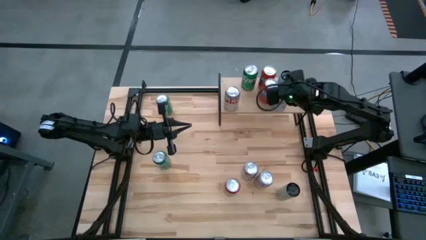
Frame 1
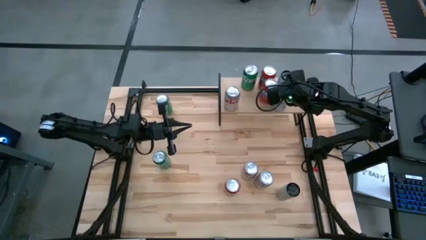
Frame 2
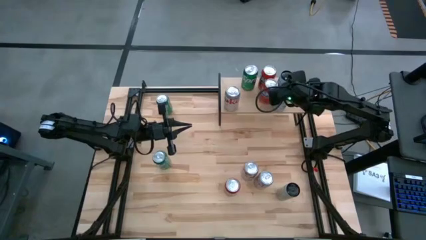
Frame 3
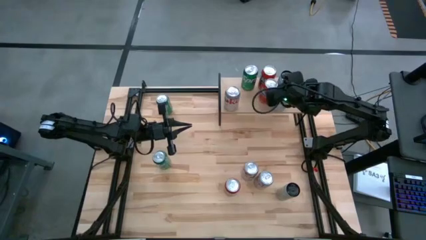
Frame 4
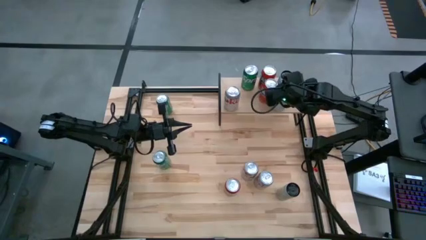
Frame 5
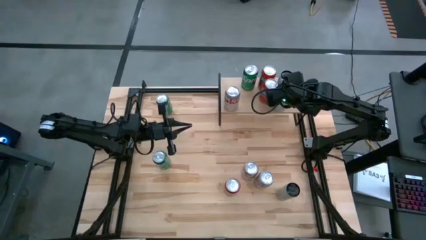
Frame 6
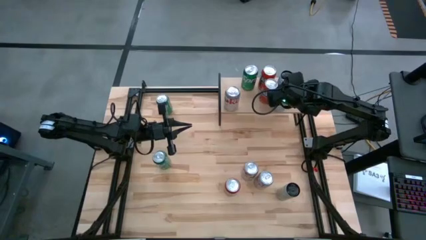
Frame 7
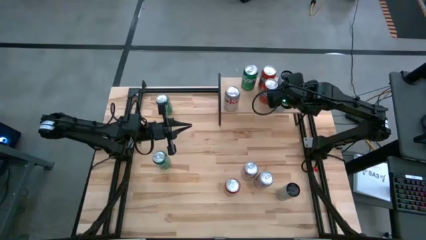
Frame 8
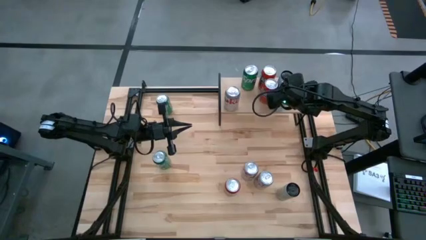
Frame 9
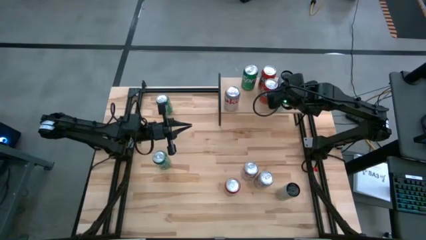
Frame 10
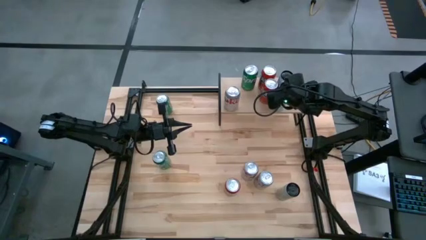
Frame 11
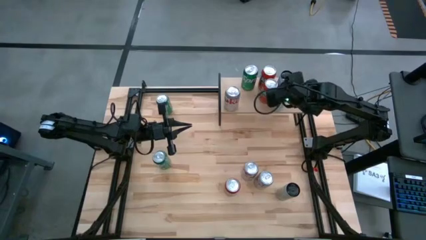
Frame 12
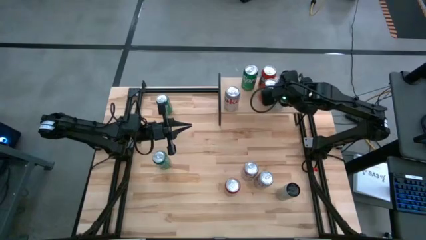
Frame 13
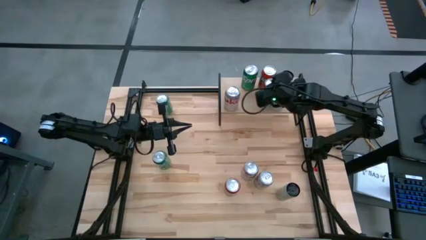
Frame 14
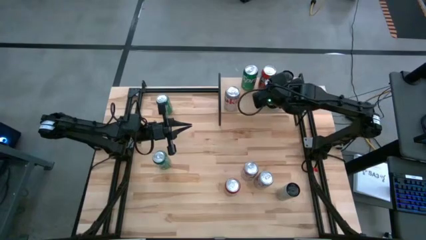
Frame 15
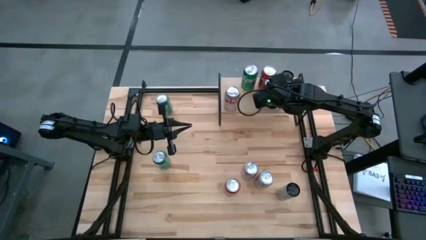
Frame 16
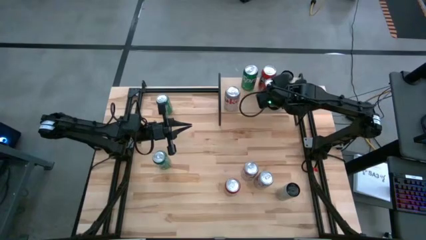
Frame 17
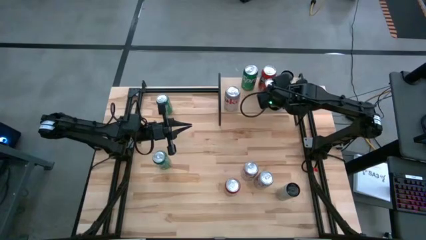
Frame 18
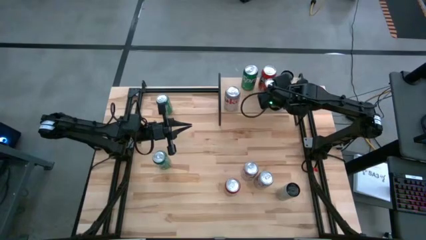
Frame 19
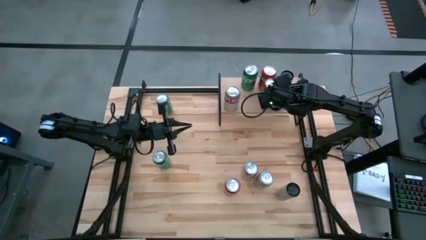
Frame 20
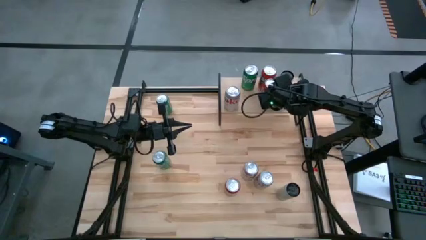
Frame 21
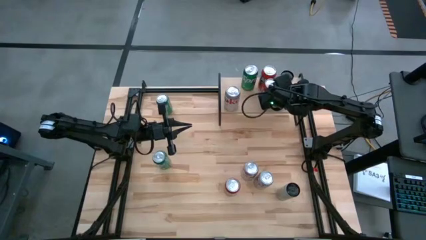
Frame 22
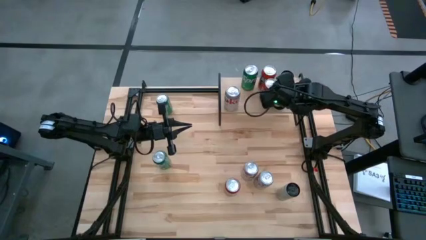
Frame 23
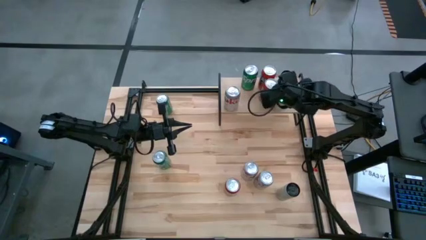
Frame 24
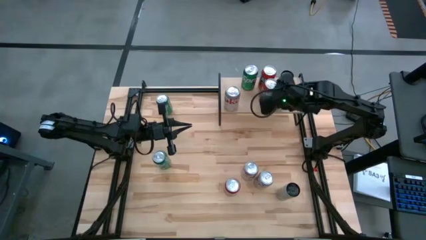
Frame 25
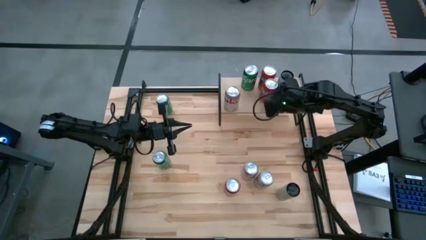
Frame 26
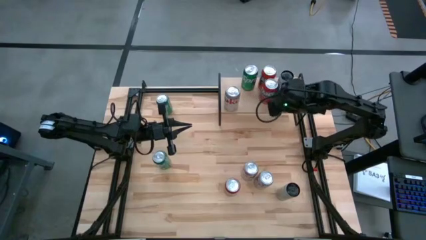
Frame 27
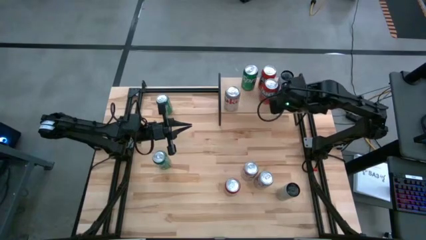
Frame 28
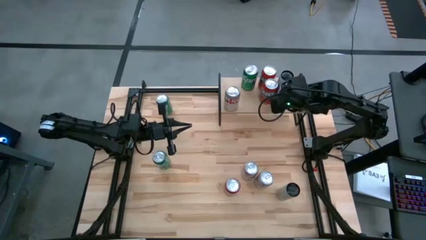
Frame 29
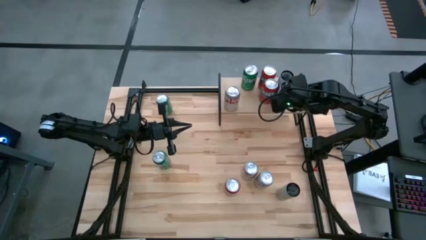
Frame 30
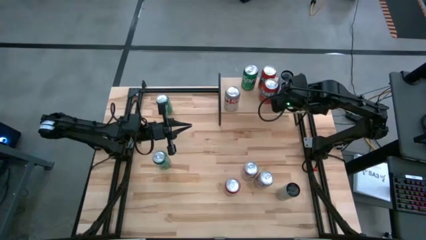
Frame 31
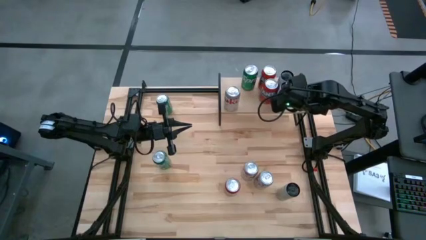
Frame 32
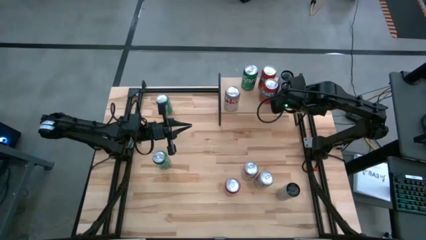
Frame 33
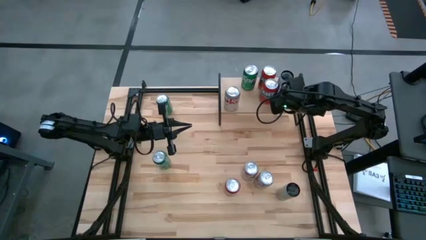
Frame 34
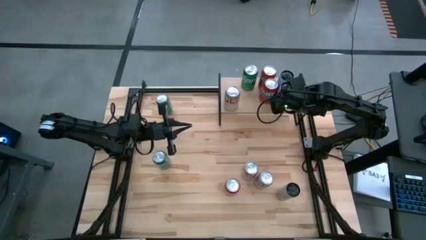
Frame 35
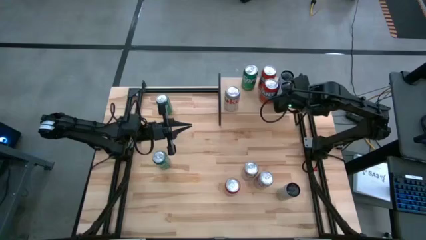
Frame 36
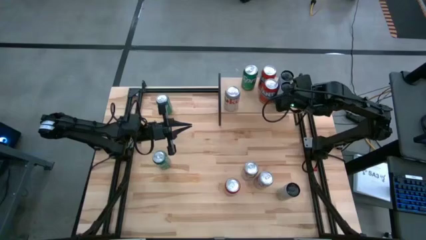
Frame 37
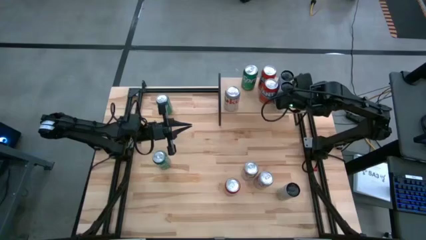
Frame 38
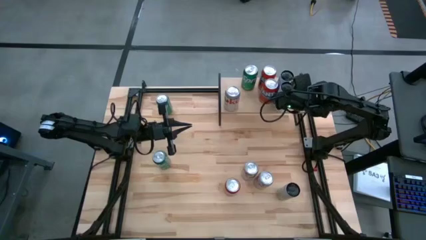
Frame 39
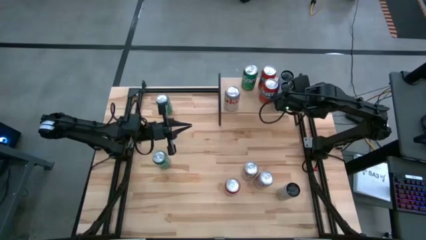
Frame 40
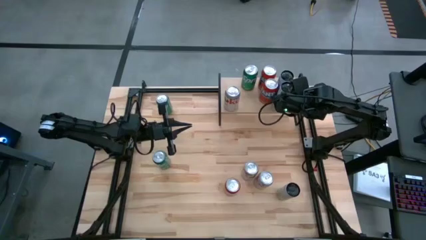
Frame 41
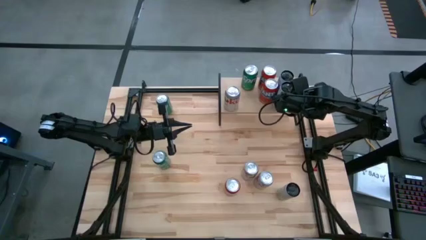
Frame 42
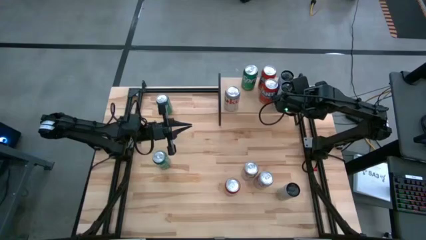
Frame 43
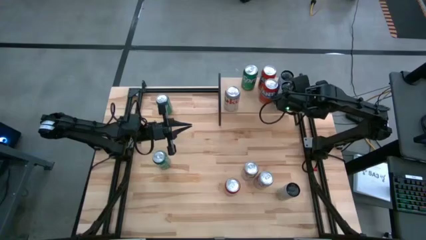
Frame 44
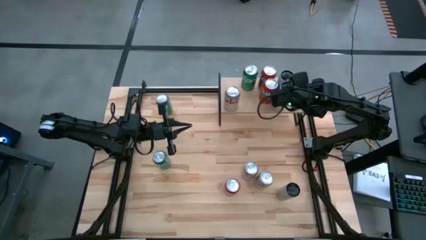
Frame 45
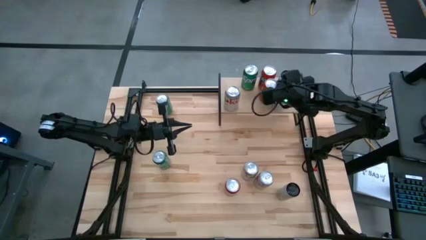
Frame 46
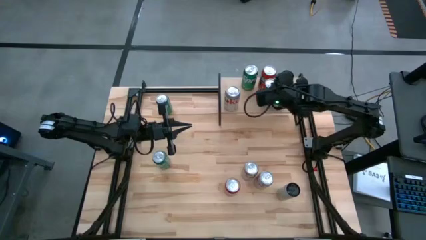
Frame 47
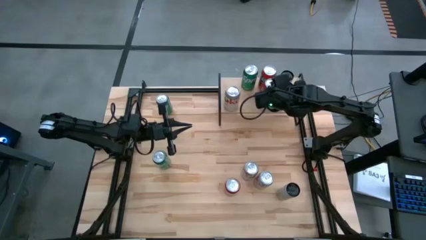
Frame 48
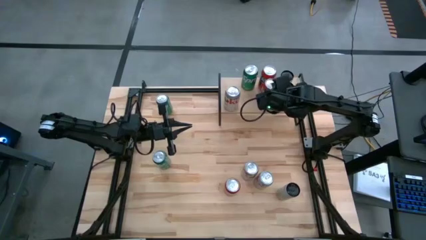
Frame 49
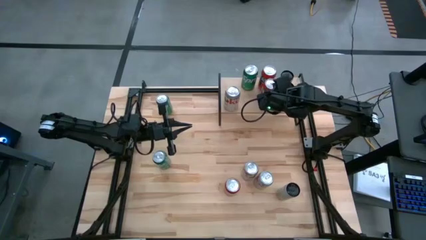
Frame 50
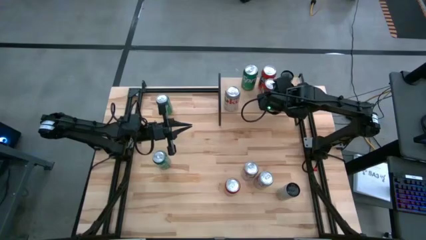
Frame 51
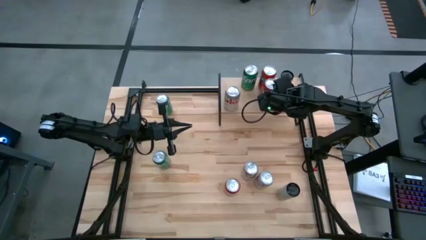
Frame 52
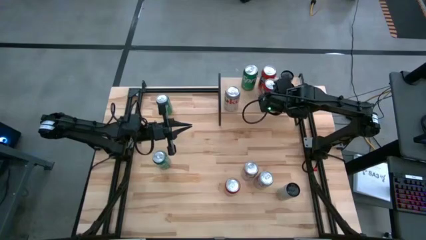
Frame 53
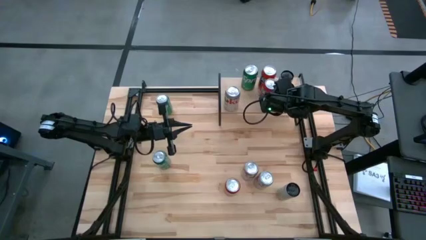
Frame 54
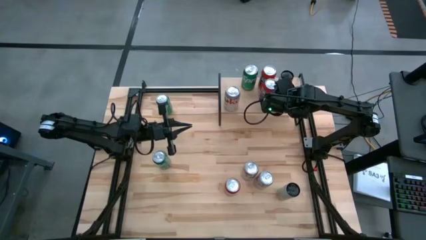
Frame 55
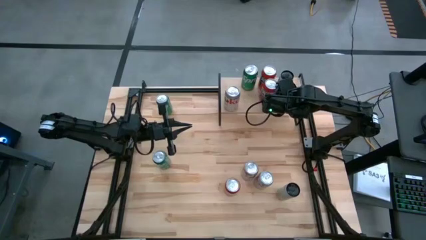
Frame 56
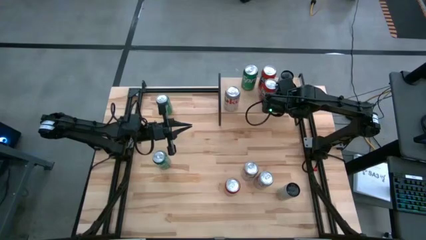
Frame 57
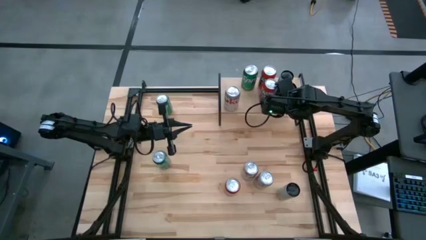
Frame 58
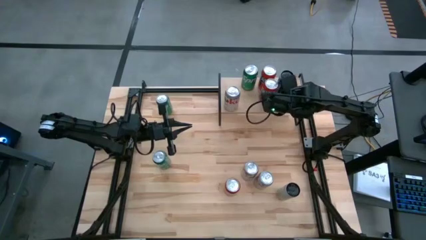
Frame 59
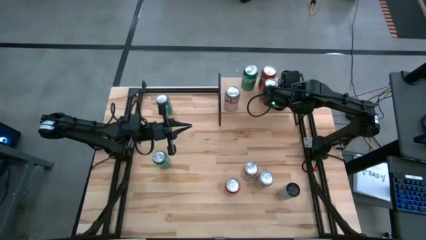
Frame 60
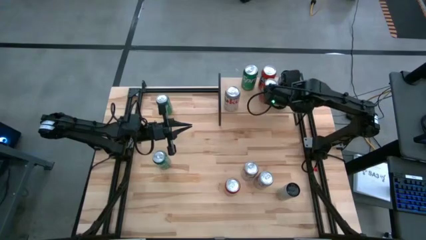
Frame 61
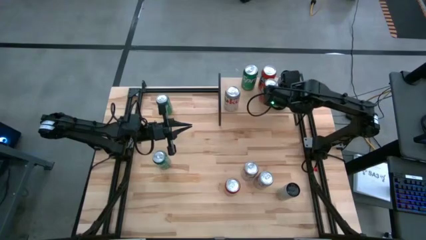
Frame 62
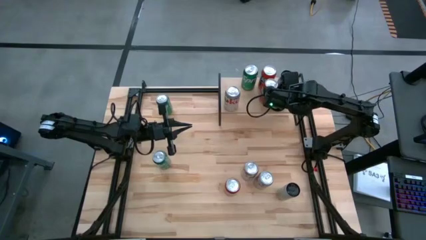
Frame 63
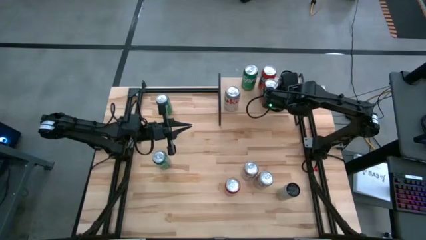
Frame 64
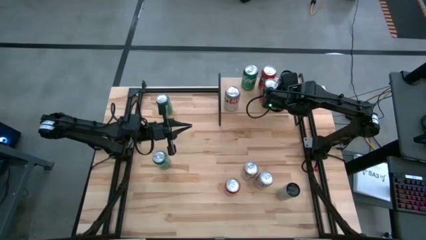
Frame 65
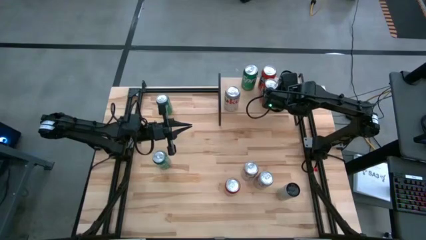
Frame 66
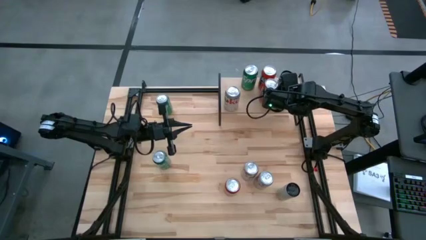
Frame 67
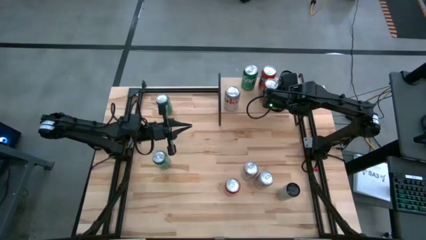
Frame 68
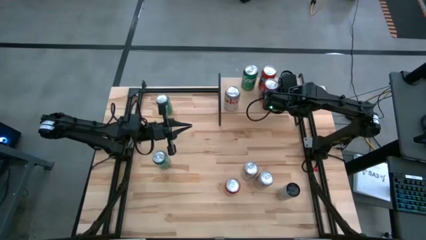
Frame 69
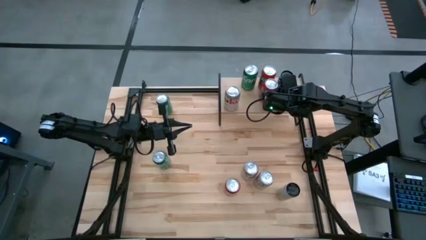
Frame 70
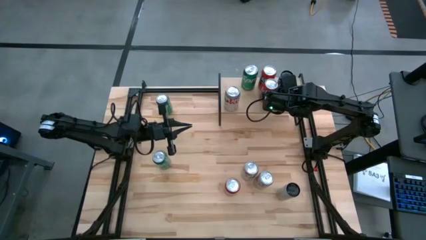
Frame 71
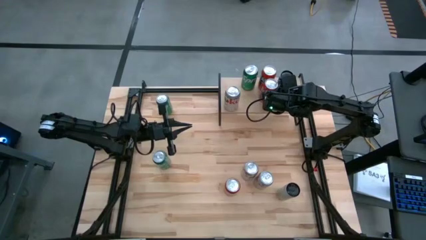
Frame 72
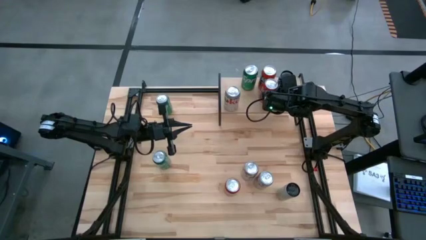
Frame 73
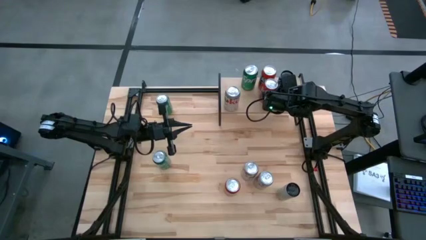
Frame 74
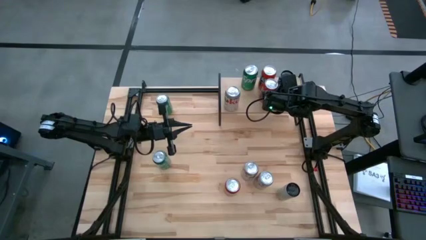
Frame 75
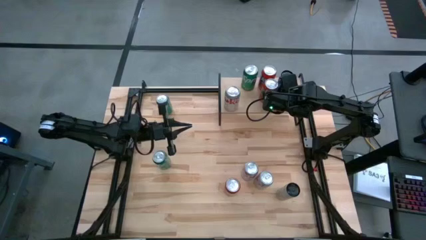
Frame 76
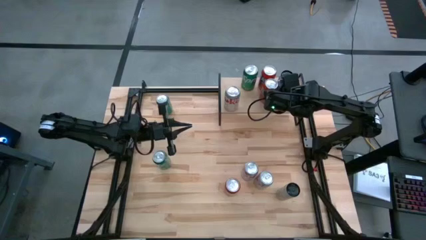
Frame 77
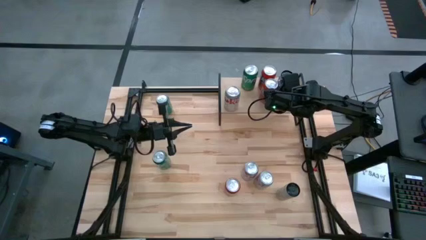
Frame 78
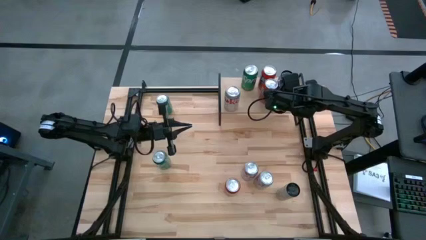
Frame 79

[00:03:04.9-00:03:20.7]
Task: Place canned beverage on shelf
Put the left white soda can on the shelf aligned in front of the other white soda can
